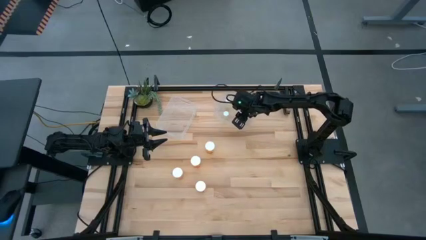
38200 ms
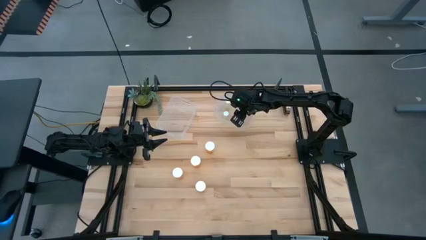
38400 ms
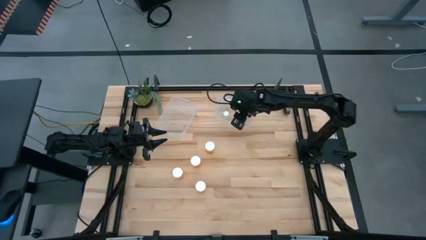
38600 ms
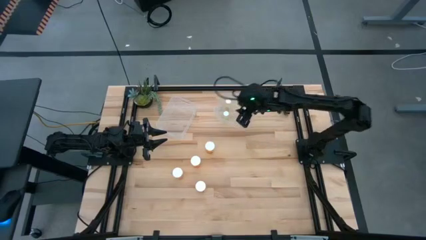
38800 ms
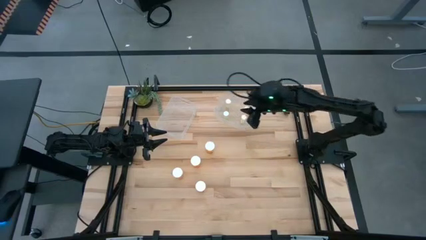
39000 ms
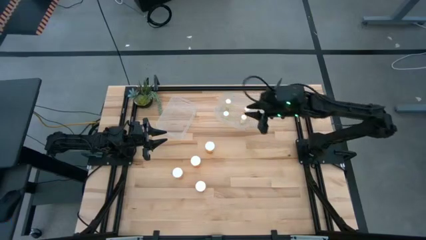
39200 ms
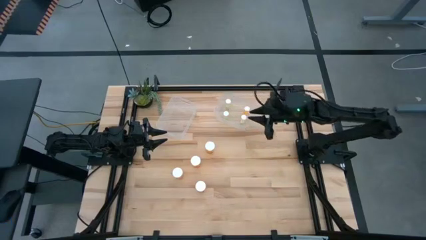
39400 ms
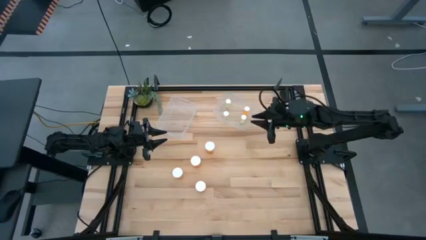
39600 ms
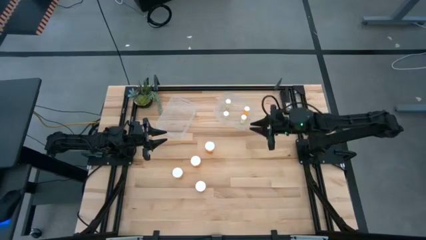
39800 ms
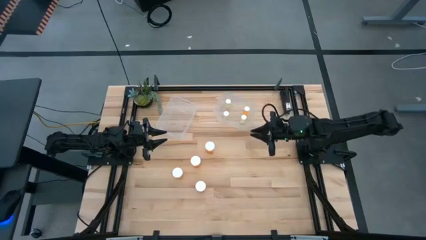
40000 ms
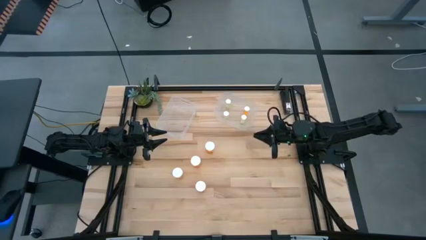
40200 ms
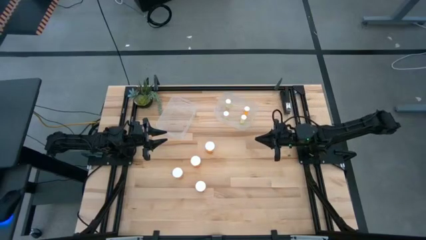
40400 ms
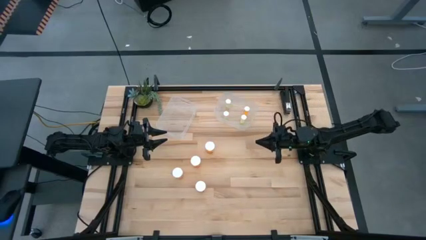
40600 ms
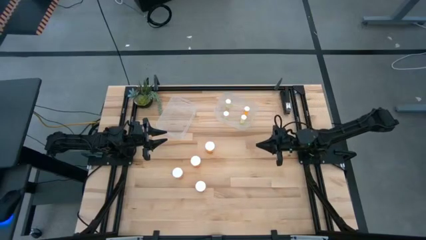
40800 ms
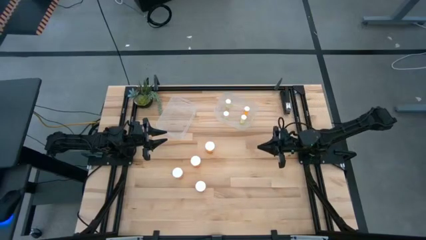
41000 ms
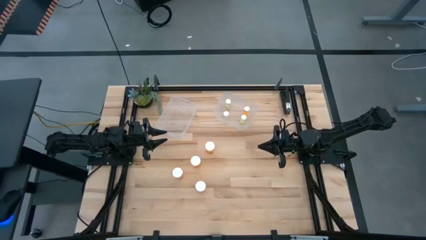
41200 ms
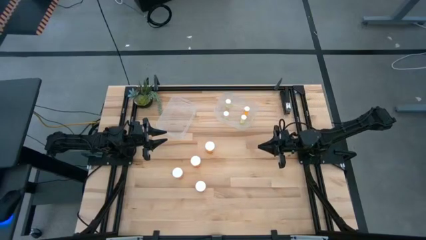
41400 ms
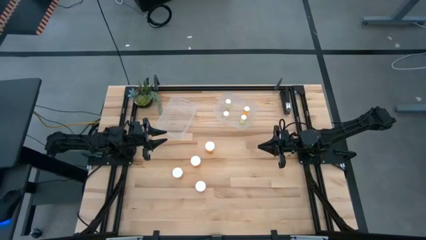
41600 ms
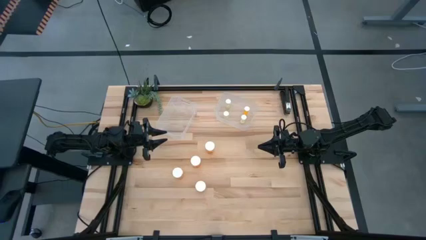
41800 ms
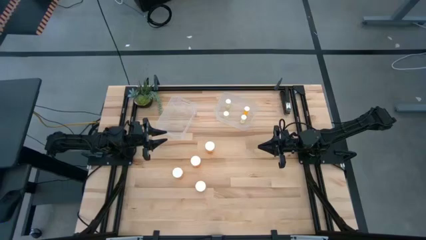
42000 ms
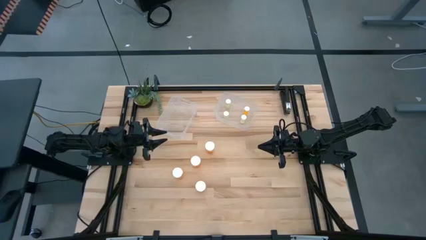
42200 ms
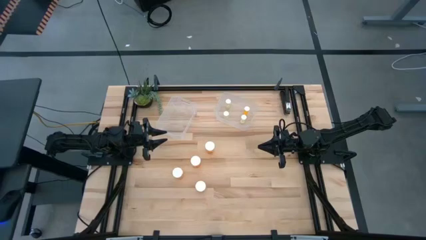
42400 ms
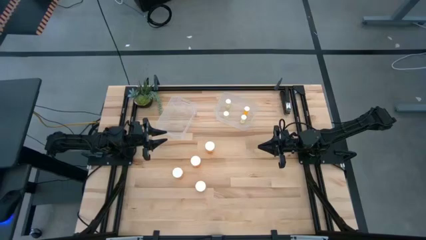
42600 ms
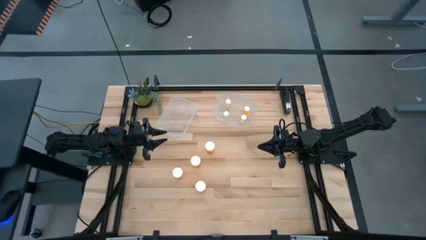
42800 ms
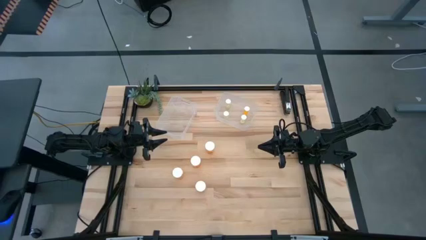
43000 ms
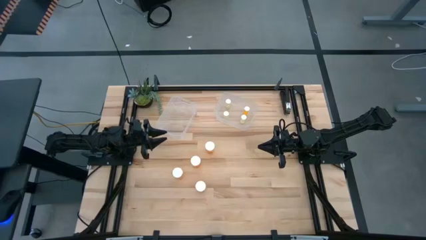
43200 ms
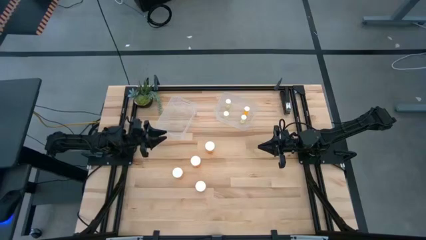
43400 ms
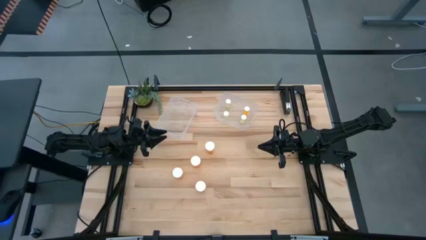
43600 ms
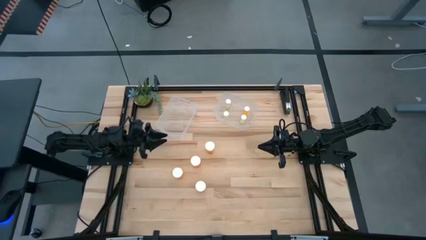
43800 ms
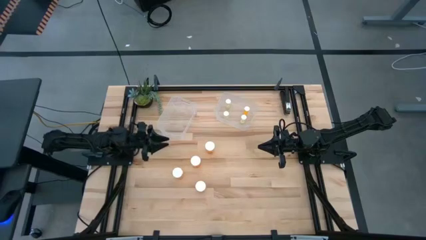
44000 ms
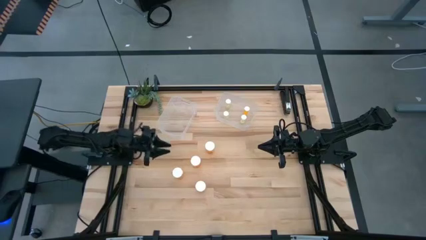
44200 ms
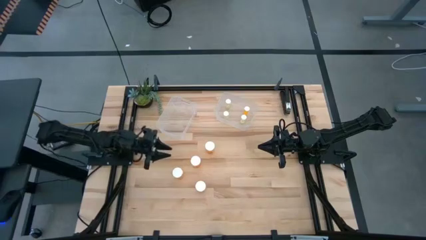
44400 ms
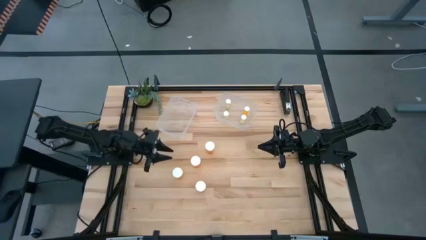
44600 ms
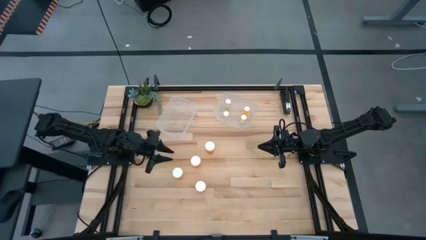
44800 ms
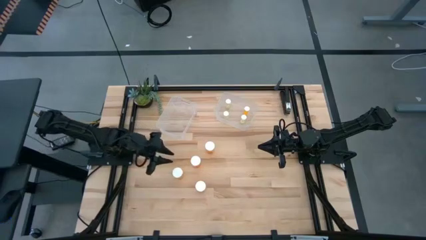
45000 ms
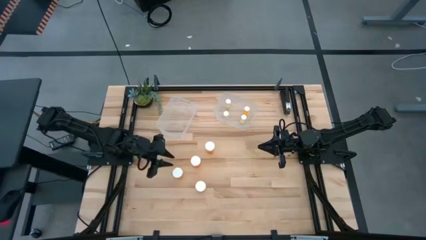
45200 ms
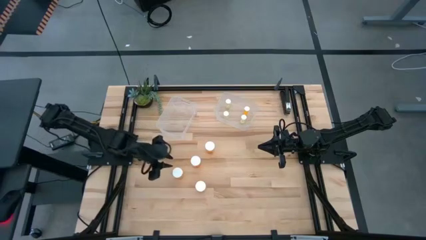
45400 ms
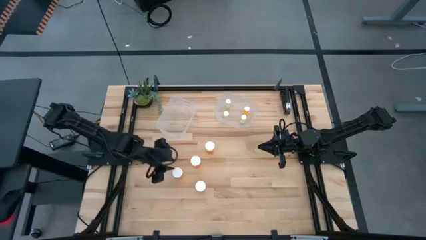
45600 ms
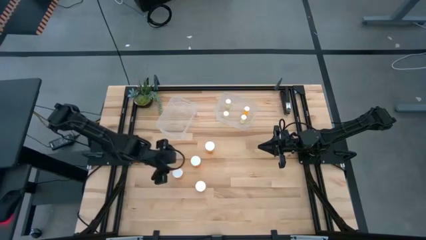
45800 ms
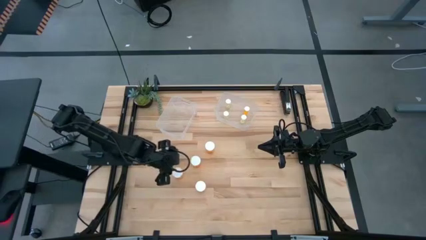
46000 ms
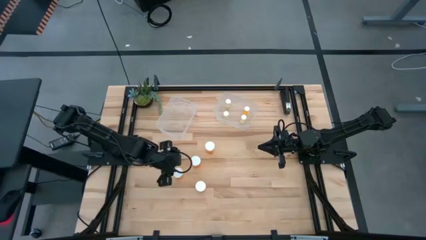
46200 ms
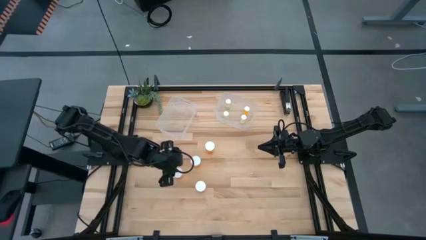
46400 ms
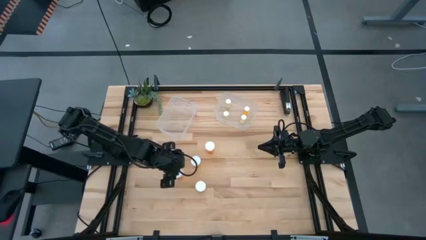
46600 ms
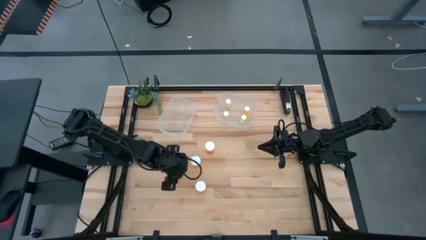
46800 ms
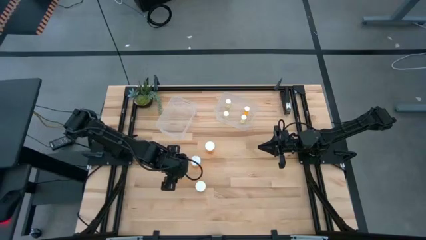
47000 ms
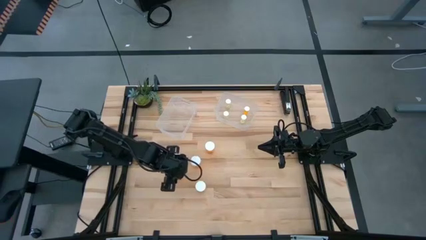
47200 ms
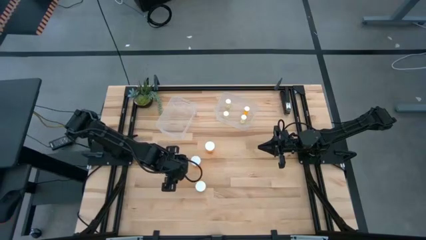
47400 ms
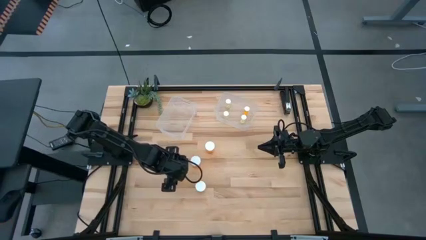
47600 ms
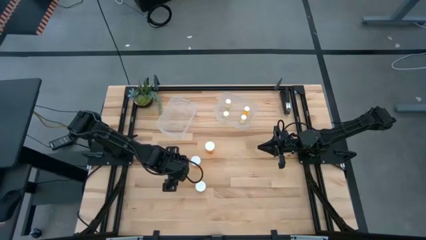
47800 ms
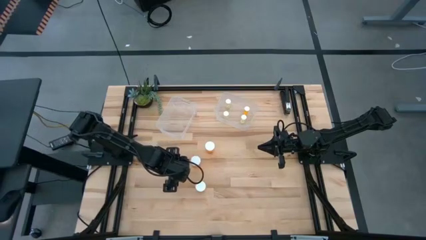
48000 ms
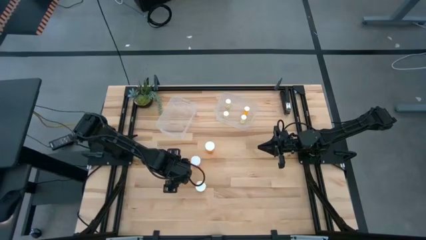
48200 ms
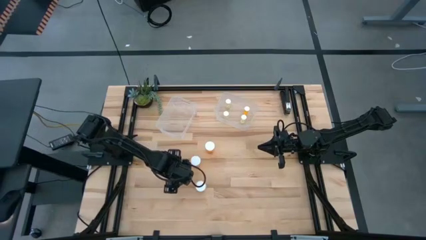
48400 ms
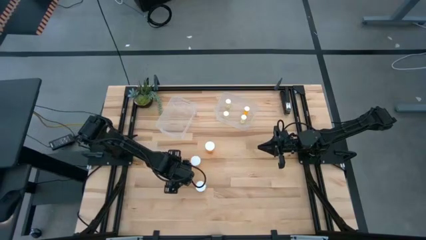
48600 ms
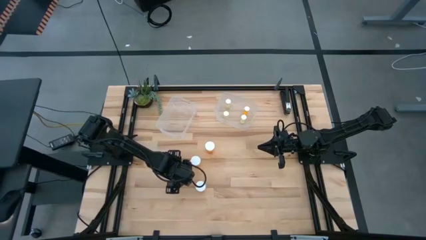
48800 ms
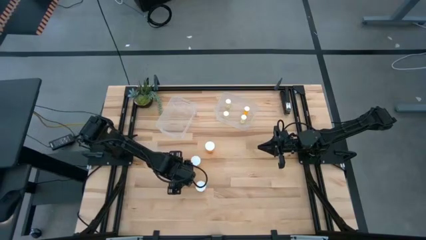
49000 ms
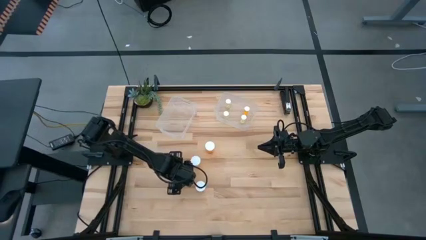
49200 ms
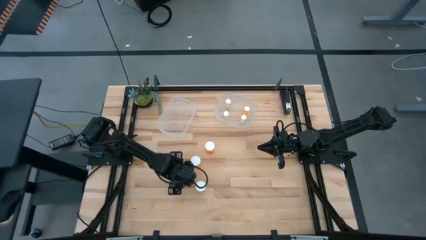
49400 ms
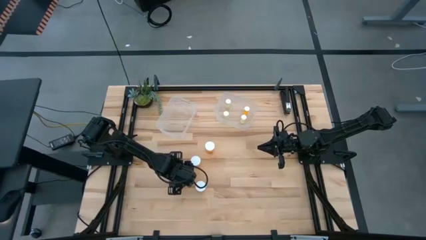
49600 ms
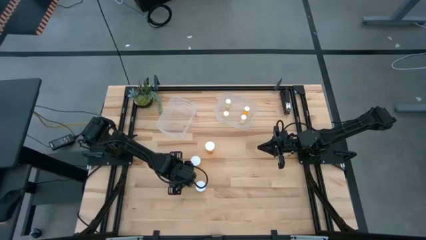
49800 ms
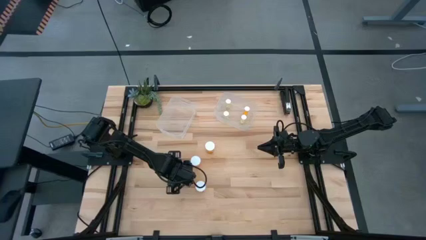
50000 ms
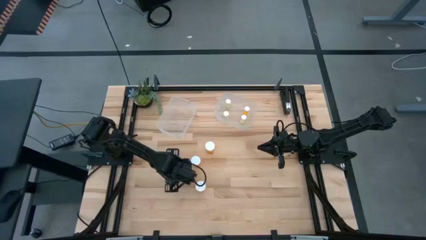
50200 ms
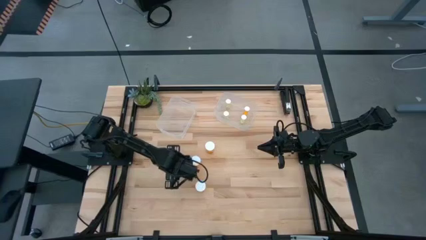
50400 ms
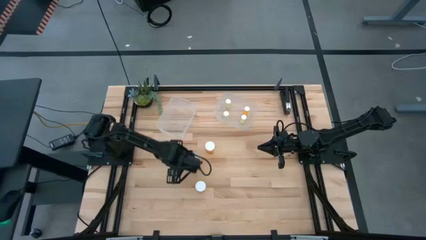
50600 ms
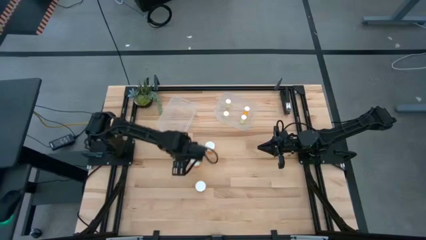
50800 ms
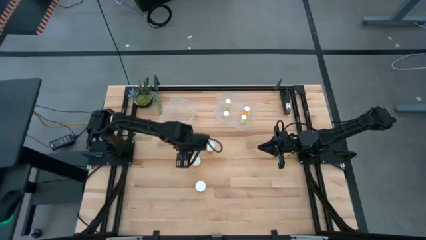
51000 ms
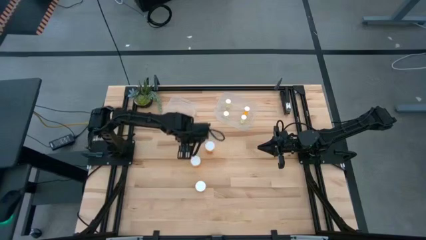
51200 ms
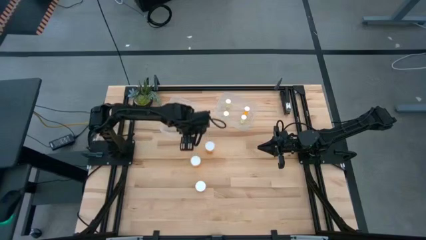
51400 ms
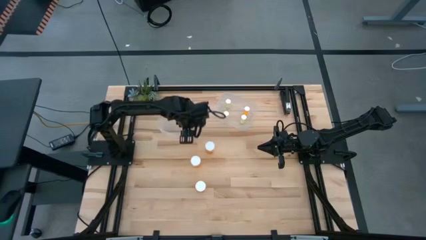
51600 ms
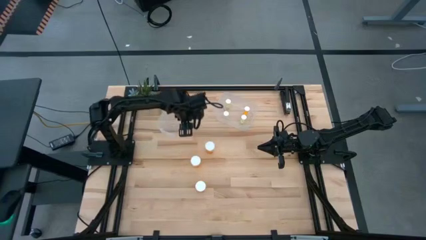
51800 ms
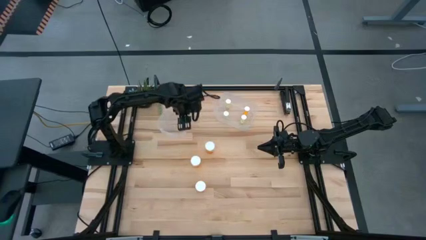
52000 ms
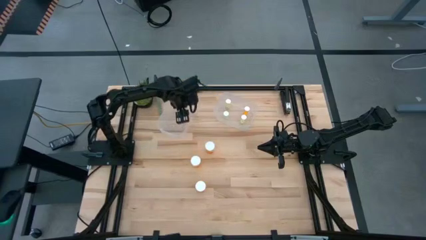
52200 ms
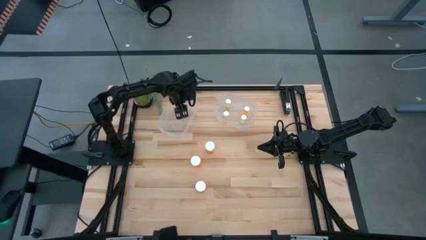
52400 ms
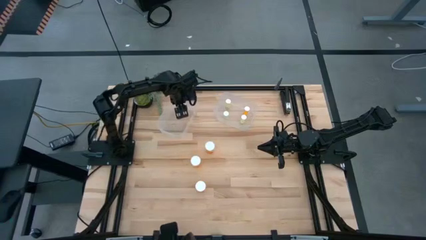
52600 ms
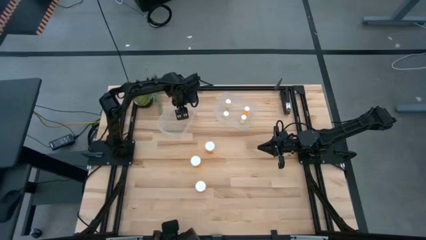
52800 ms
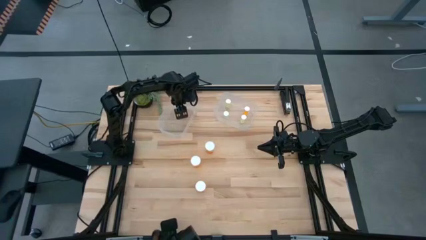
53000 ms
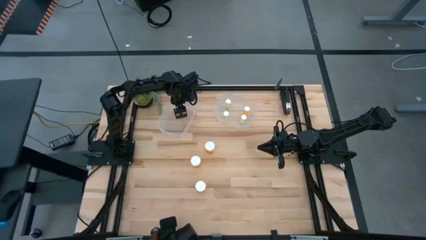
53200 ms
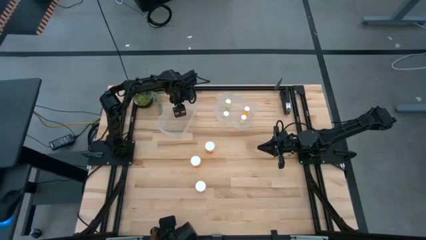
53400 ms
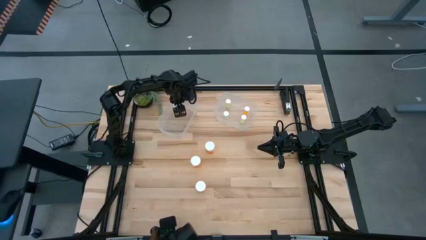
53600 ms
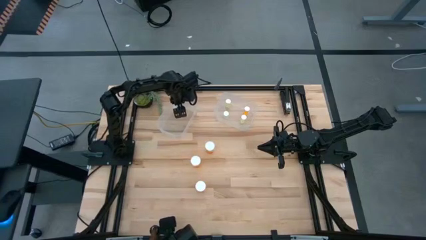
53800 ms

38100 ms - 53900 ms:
Task: Pick and place medicine bottles into bin by pill shape (circle, oval)
Put the large orange pill bottle into the left transparent bin
